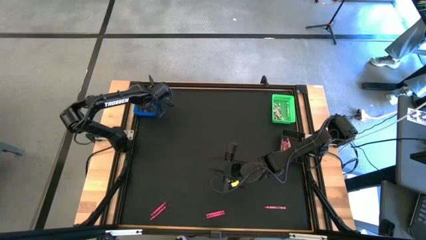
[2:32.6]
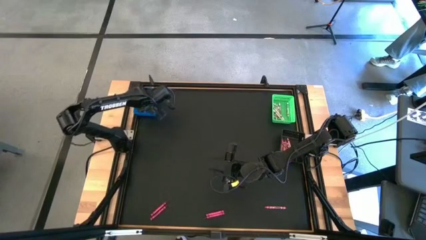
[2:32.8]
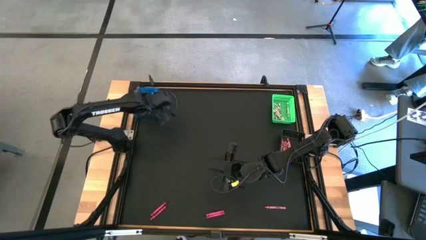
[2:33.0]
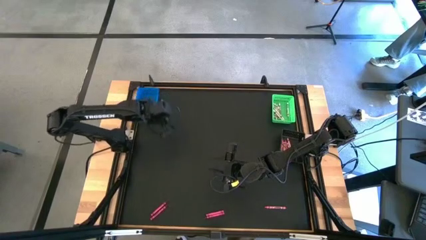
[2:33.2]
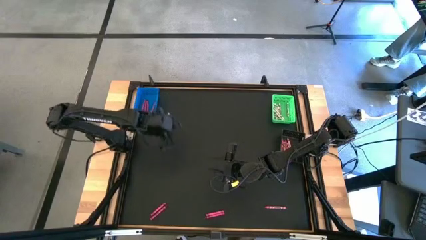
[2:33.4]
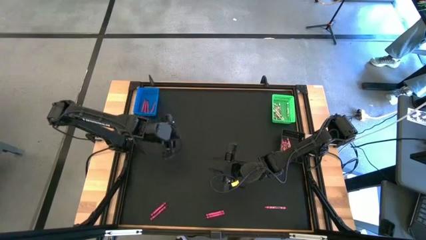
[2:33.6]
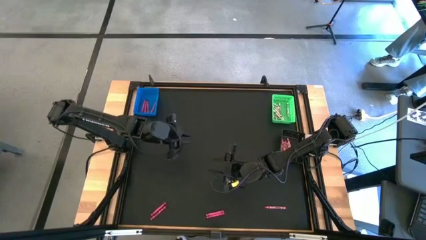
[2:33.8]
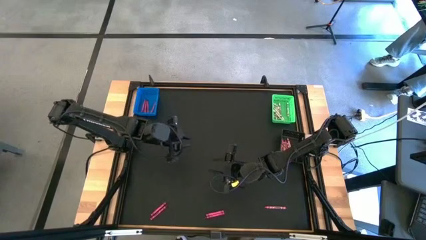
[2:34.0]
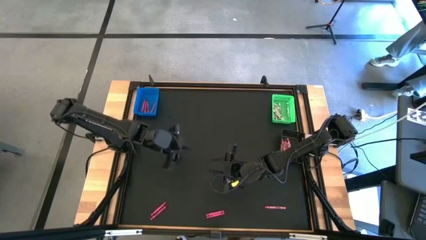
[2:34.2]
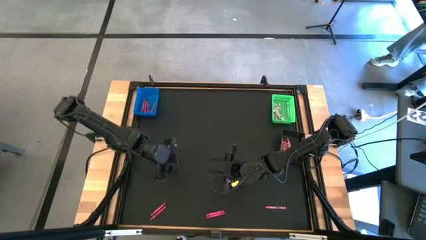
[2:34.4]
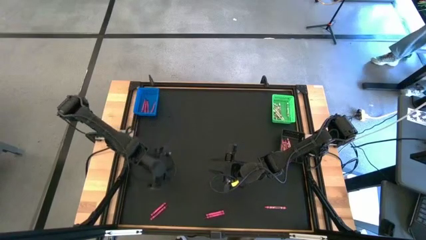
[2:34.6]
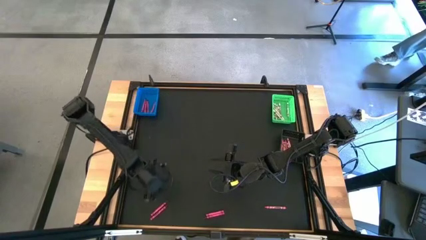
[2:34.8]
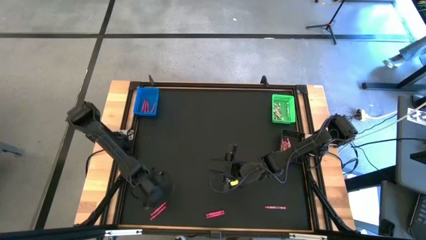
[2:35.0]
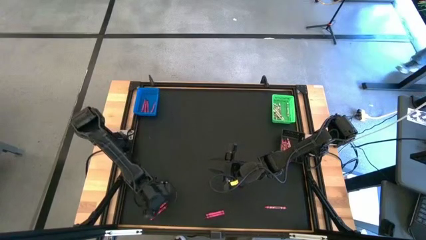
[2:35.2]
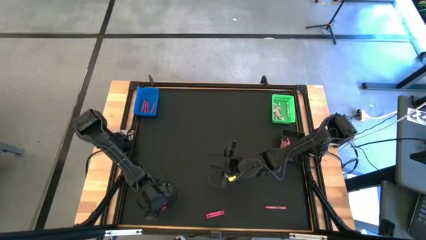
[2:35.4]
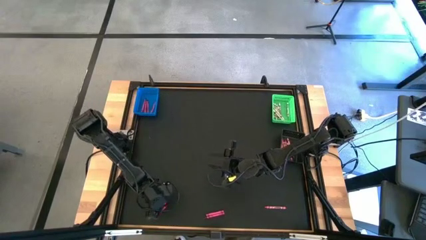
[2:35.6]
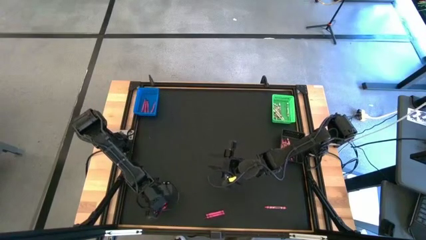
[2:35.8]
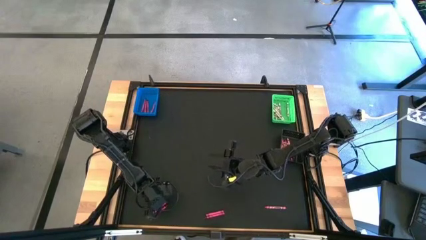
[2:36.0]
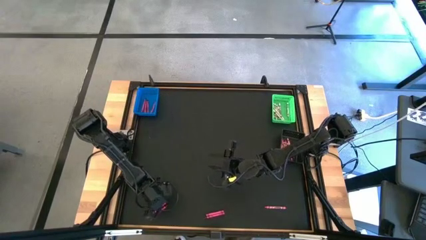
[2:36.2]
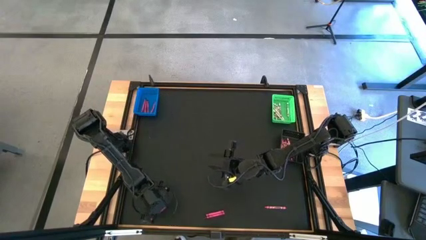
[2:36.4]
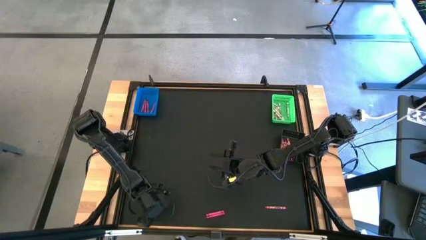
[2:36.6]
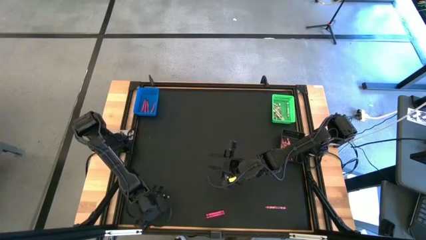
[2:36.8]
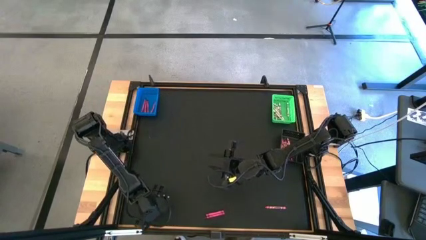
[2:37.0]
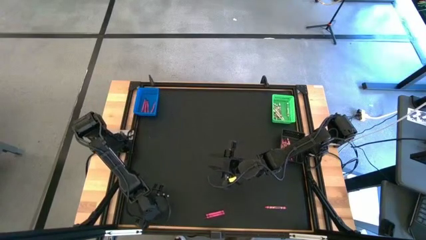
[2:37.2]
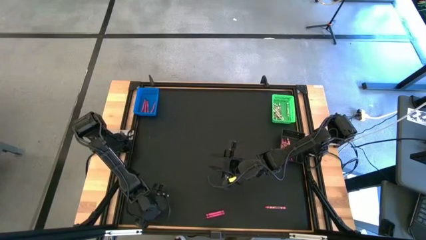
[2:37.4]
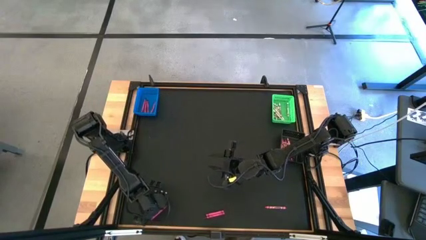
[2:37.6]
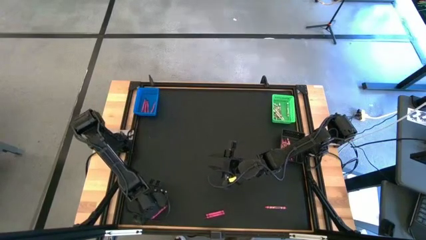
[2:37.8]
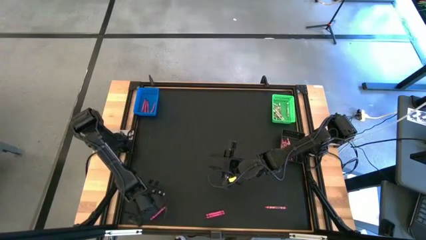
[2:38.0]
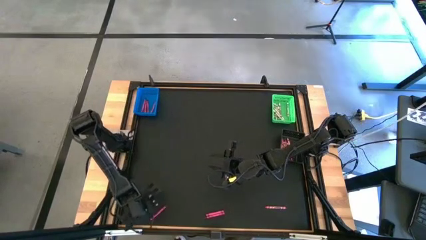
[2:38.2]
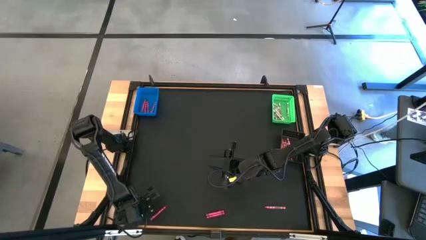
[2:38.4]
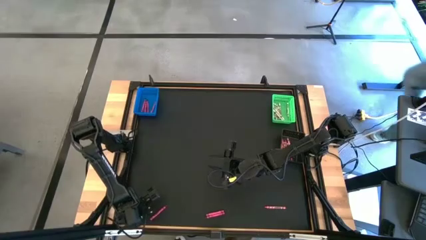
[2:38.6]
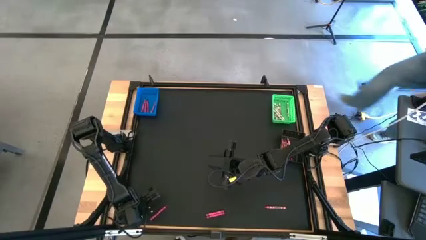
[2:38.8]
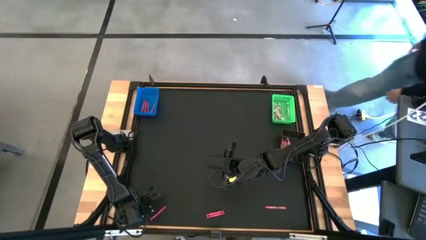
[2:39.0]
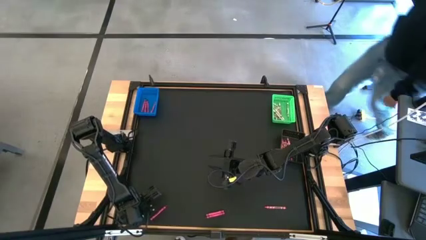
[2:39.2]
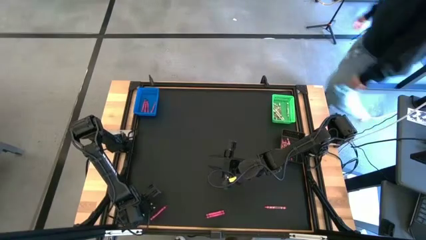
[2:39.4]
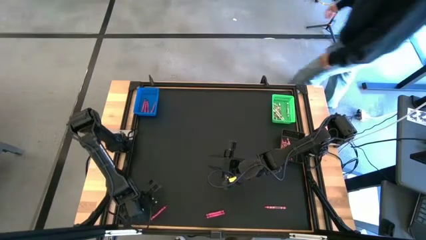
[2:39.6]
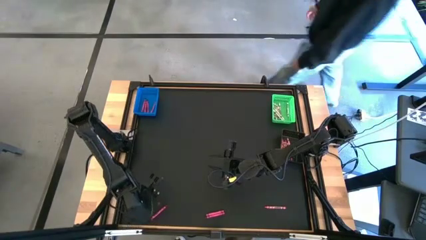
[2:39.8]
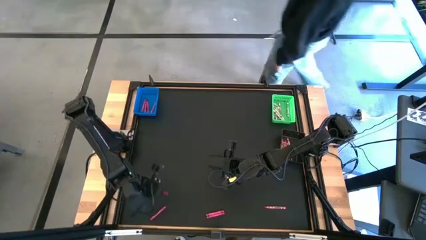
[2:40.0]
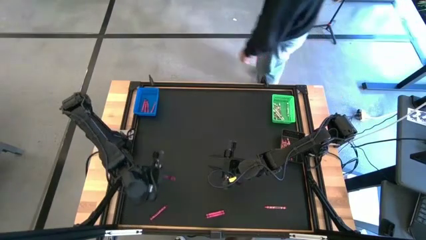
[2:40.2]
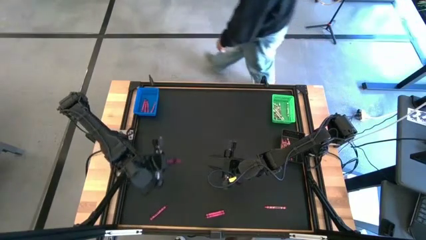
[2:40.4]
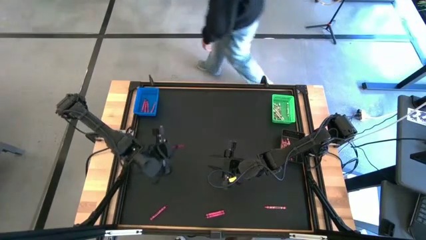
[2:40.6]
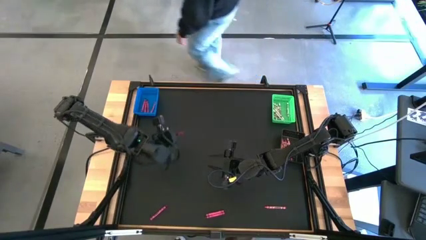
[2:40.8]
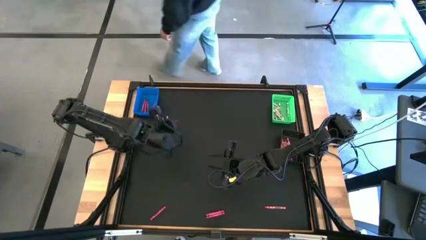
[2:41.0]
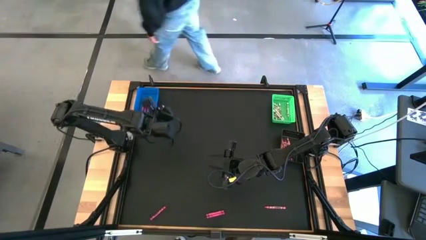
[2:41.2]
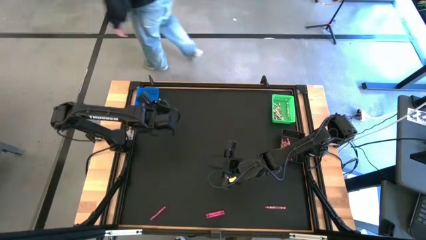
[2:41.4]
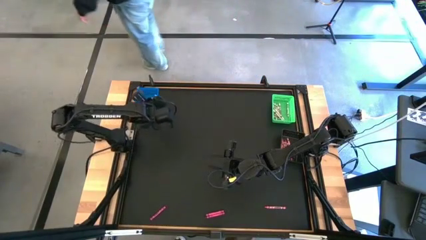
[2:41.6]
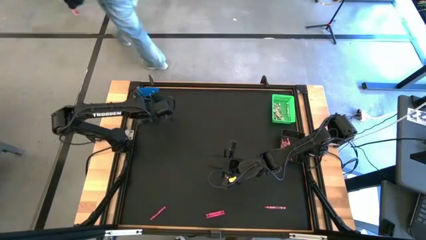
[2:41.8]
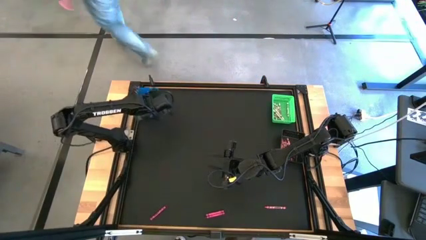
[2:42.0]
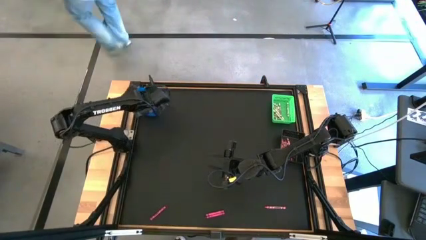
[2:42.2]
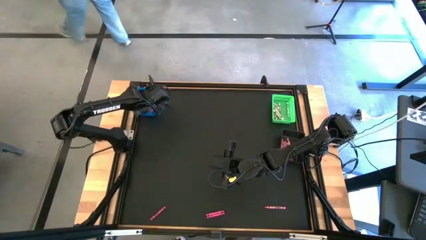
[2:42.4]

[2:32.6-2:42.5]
Task: Sort crayons
Put the red crayon into the blue bin

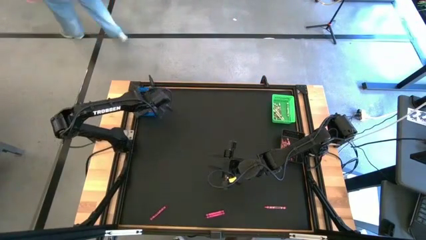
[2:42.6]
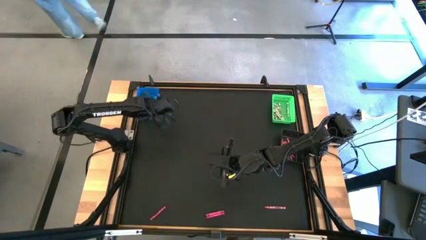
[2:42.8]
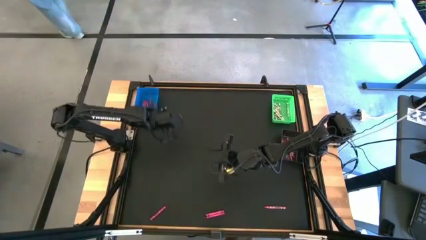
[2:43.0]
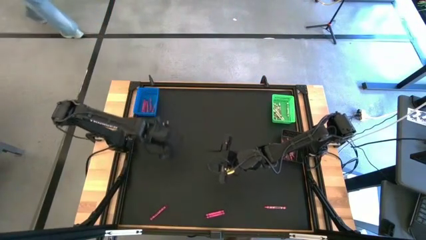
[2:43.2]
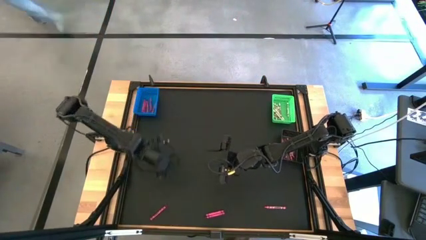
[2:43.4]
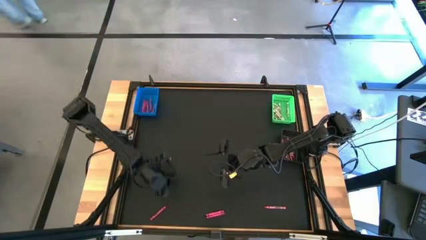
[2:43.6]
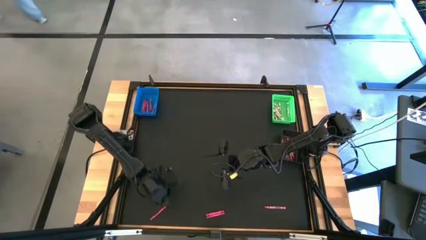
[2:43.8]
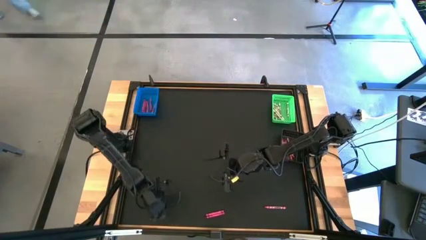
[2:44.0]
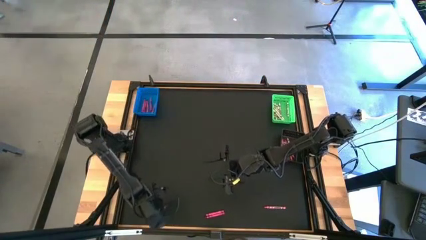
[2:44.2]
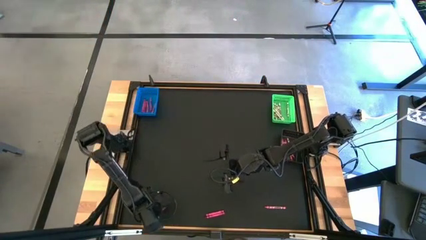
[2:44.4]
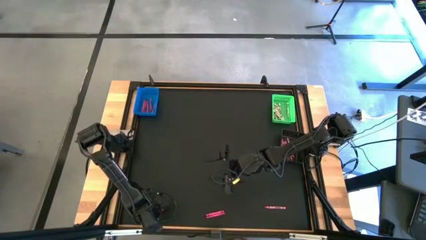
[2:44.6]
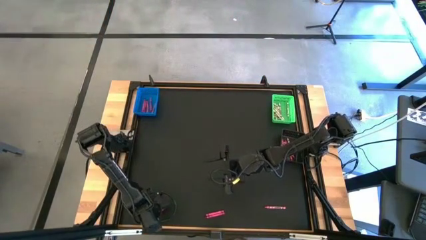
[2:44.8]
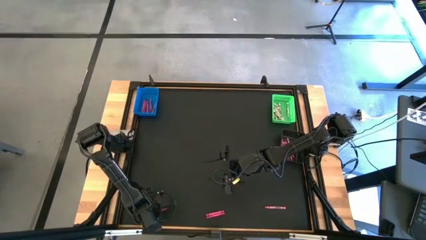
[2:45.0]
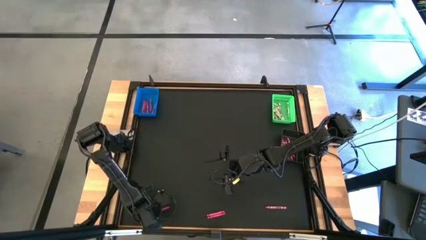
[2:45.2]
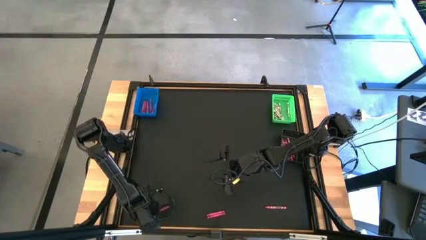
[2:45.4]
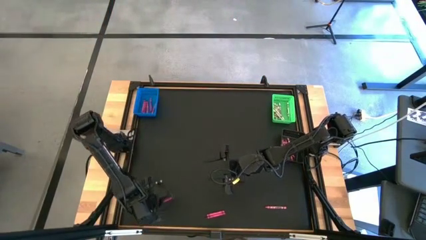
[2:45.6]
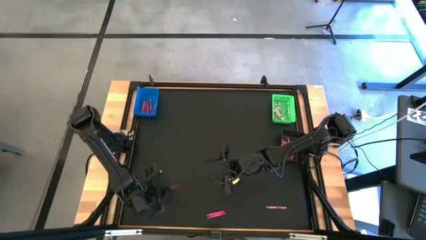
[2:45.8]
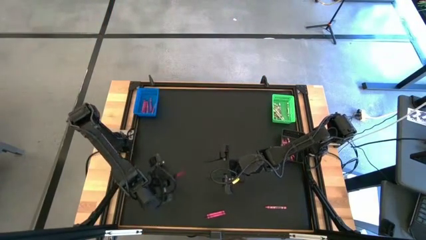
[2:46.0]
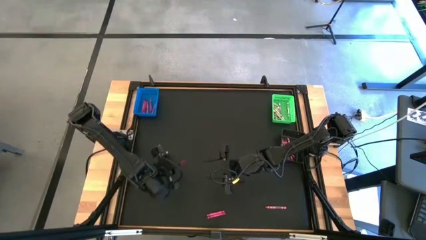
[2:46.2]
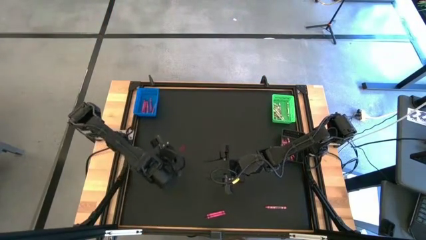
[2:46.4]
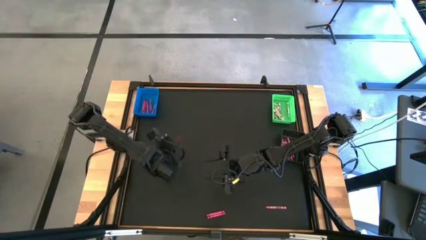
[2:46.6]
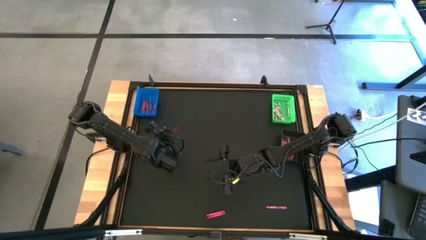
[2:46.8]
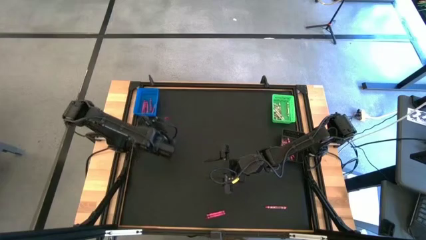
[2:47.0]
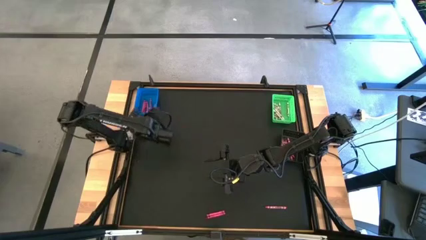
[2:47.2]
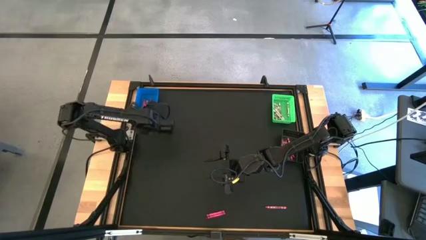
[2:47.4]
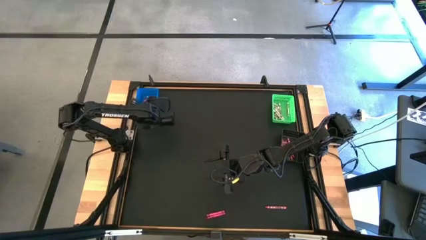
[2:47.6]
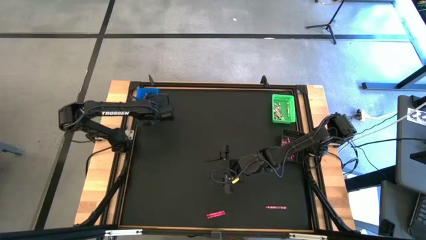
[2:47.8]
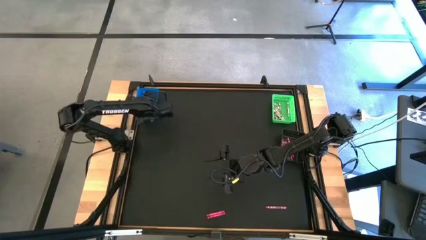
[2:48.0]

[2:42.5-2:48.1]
Put the red crayon into the blue bin

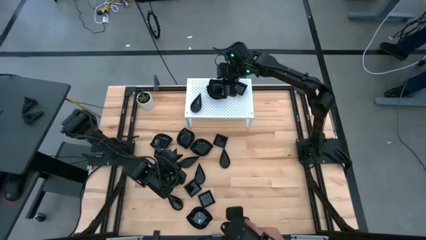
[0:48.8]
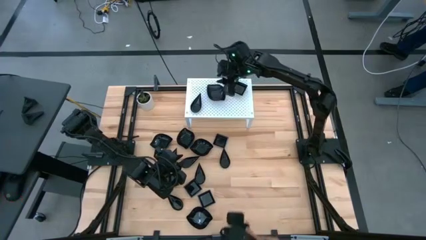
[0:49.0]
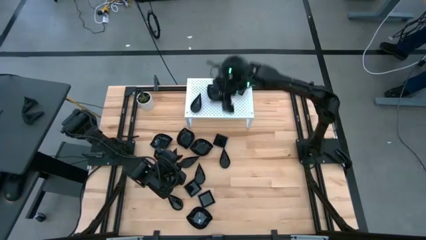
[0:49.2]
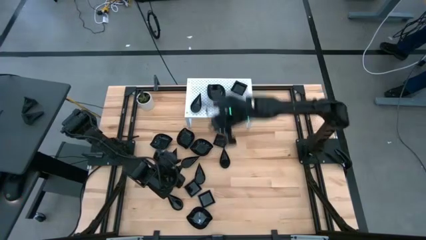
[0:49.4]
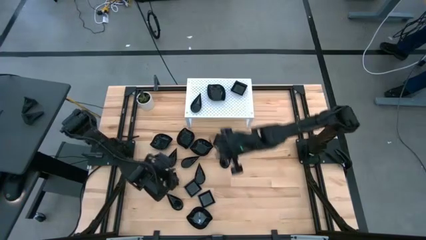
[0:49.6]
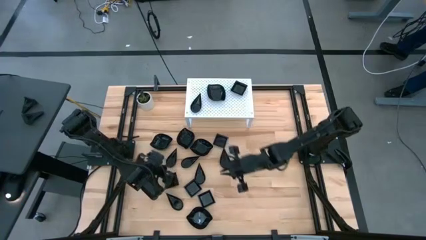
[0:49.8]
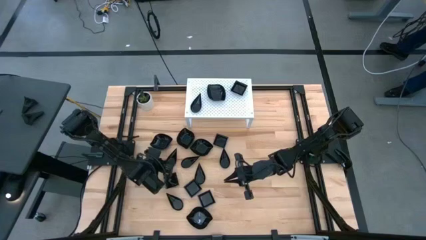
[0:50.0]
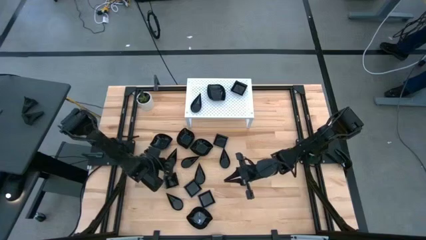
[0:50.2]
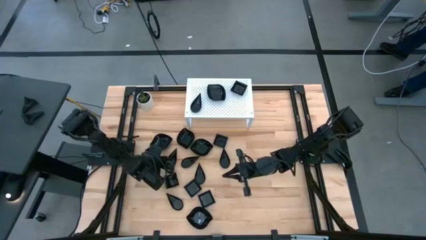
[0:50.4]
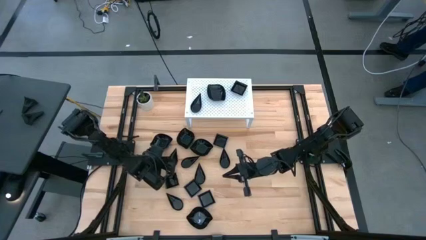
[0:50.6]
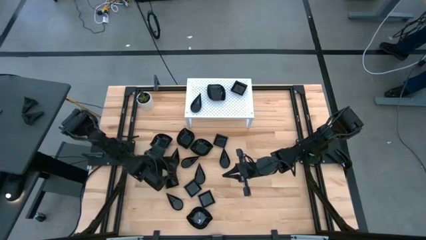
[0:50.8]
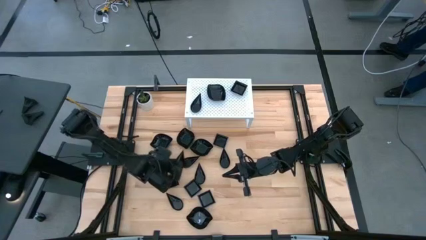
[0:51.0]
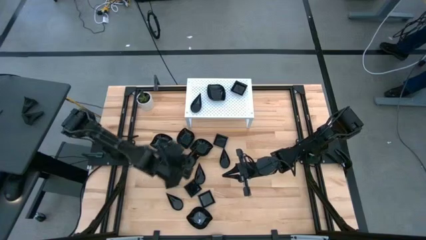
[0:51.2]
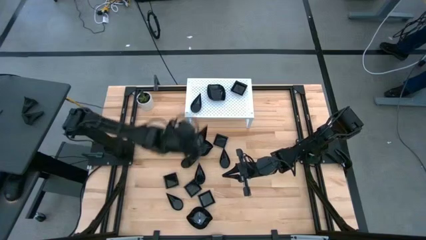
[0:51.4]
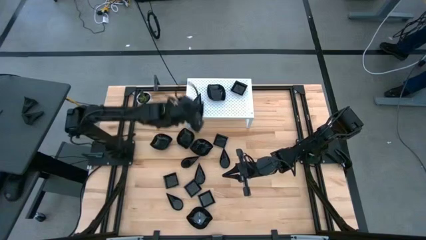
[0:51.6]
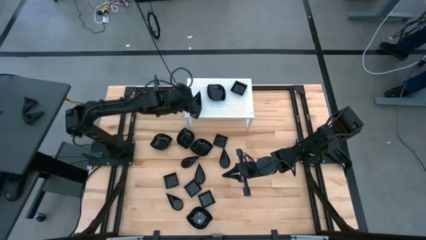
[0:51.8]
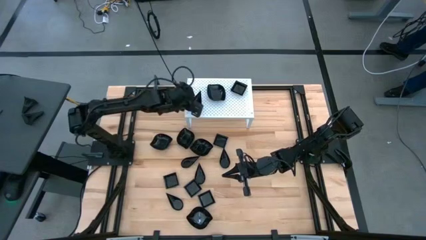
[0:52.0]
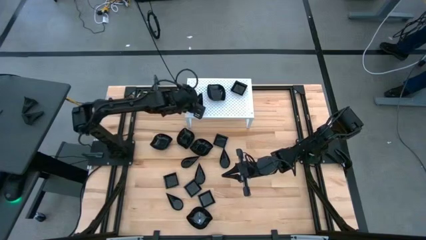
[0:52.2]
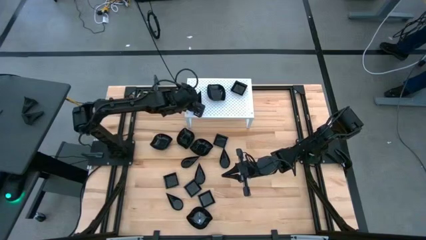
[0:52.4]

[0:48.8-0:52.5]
Task: Pick & Place Mini shaped plates
Stack the black drop-shaped plate on top of the other black drop-shaped plate on the shelf
